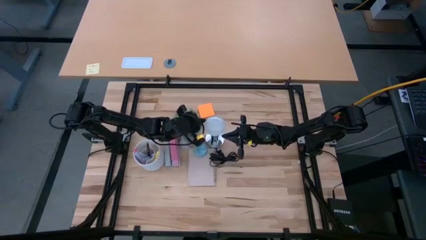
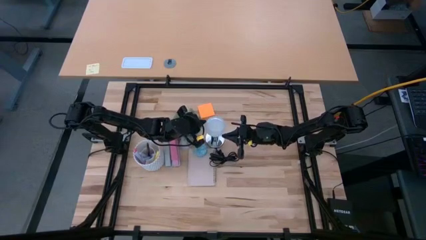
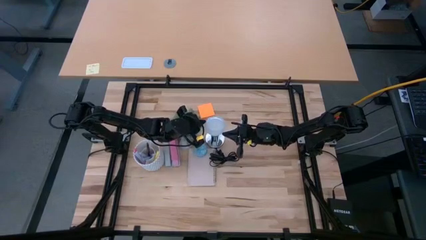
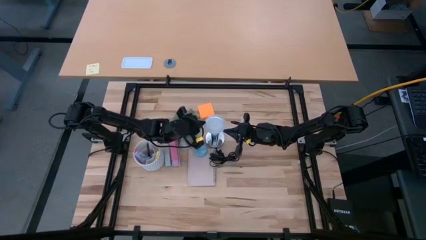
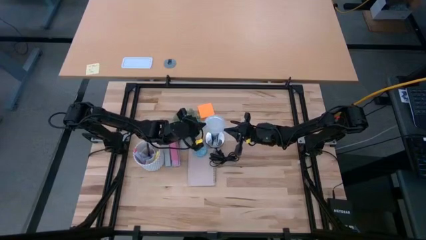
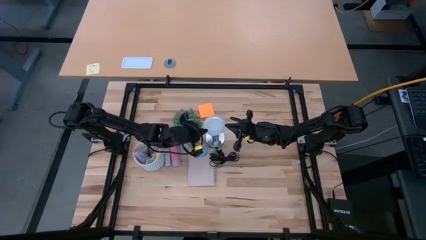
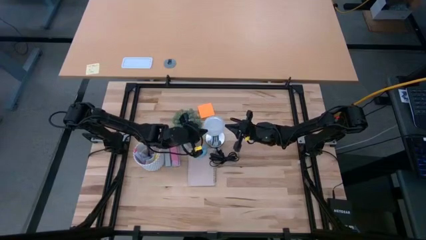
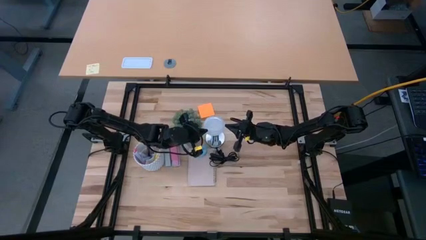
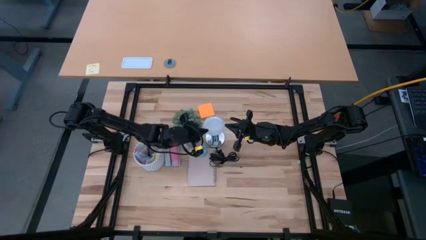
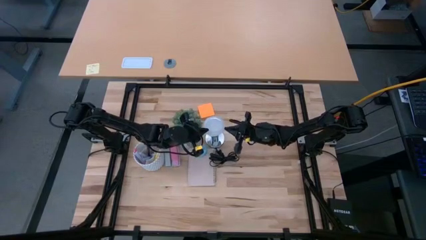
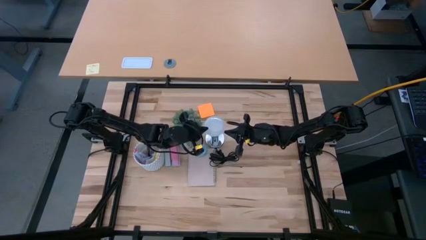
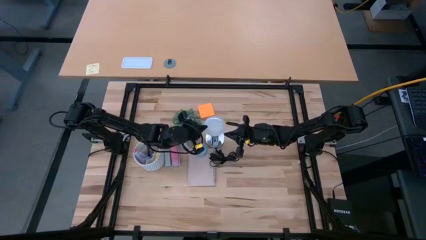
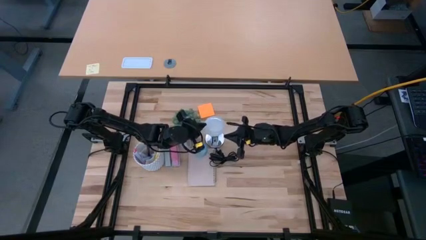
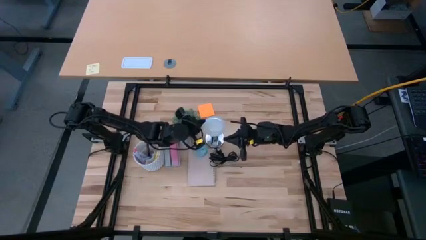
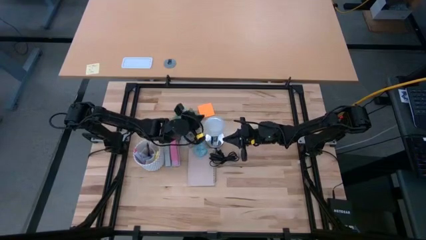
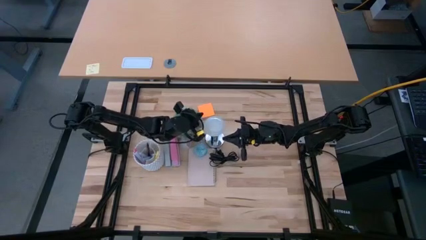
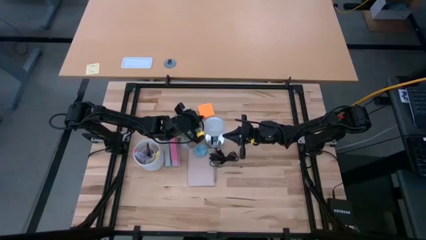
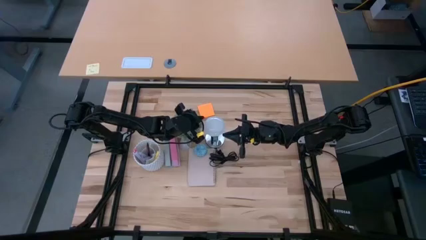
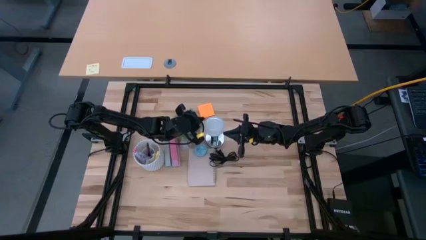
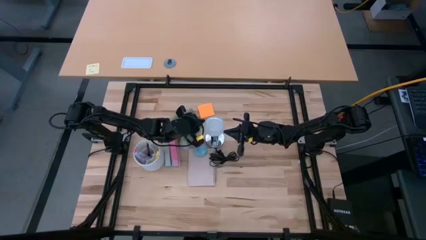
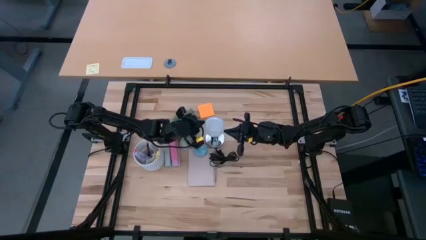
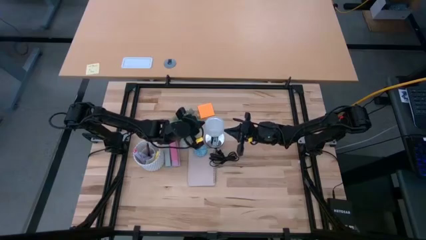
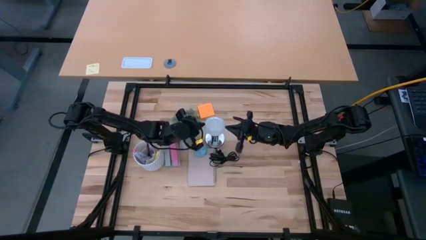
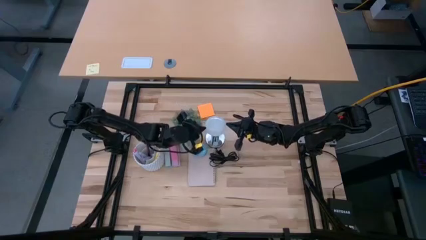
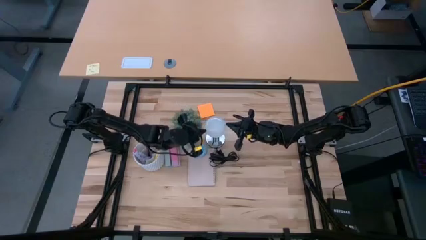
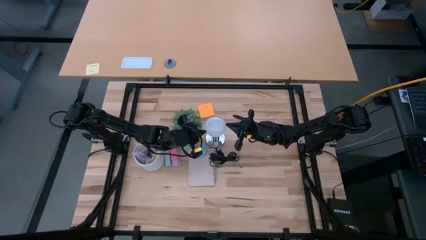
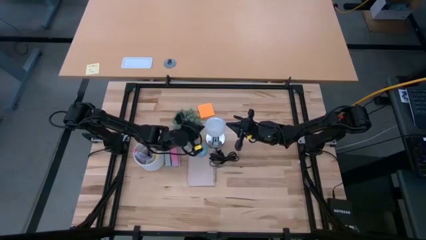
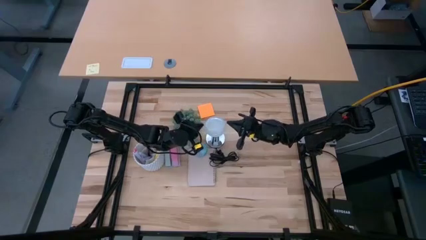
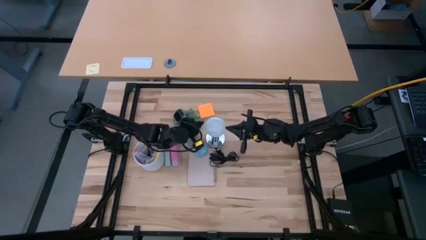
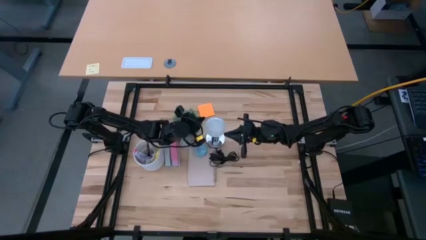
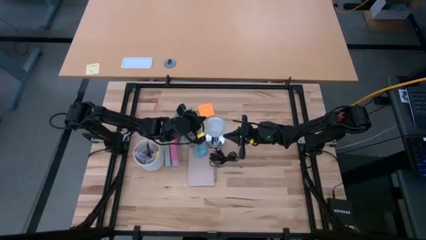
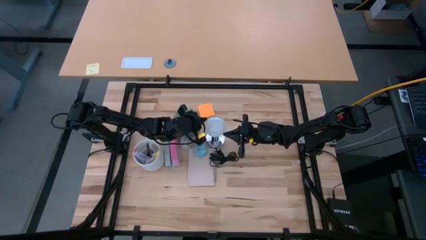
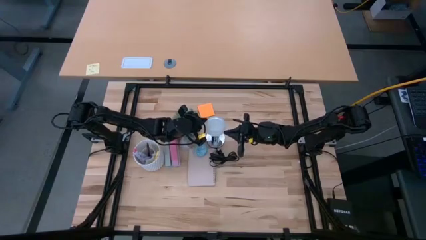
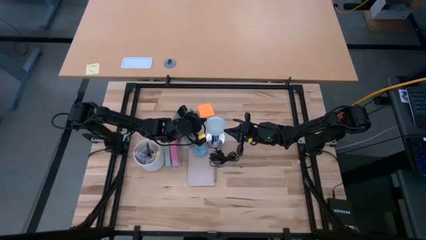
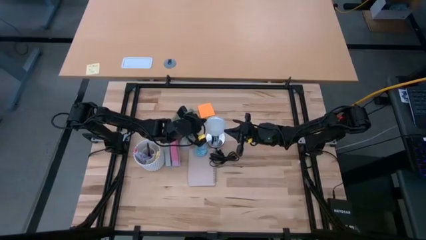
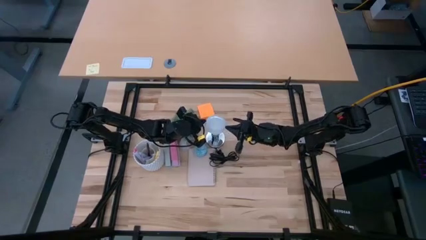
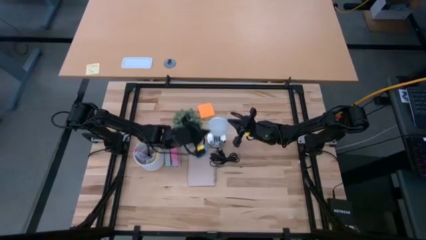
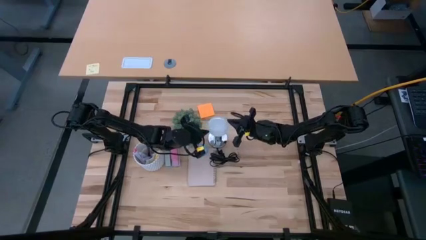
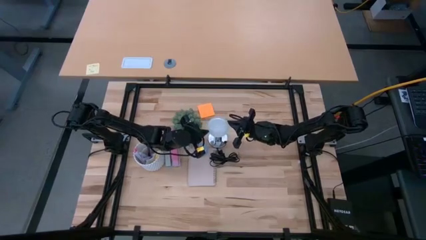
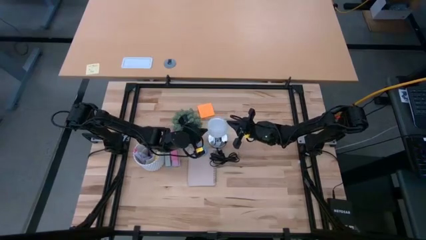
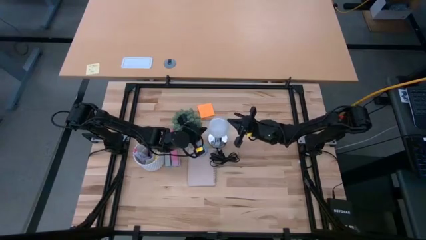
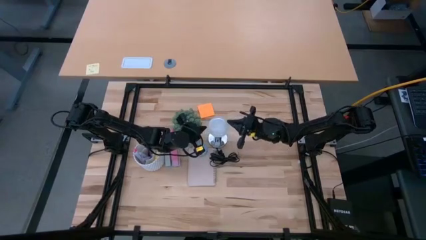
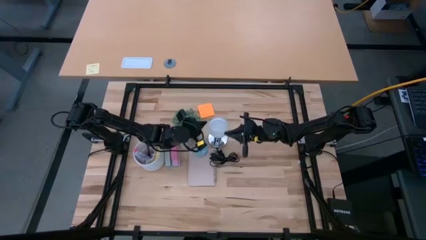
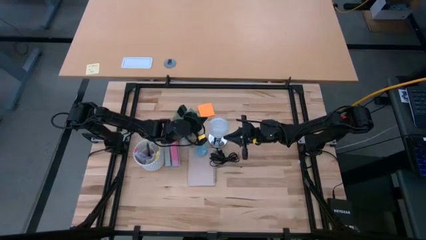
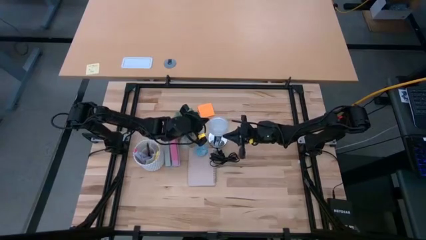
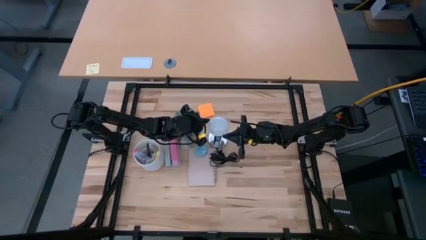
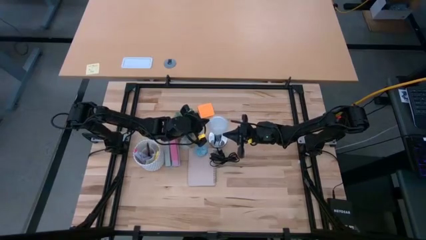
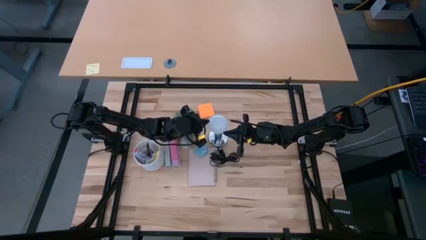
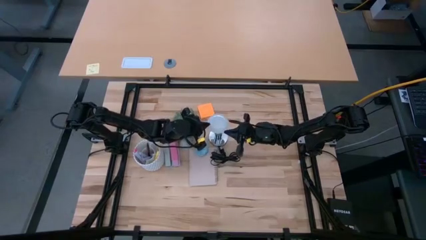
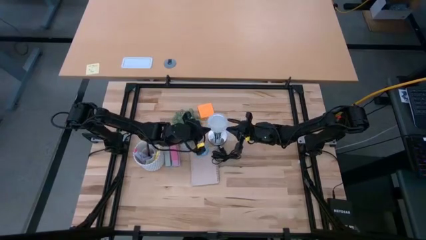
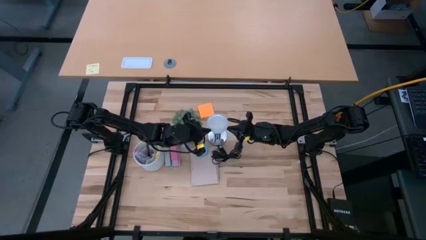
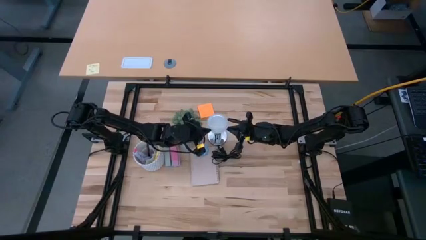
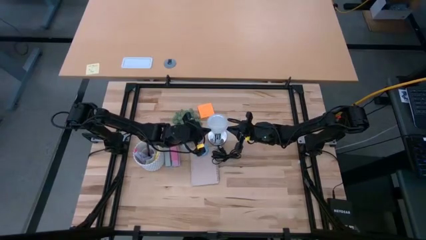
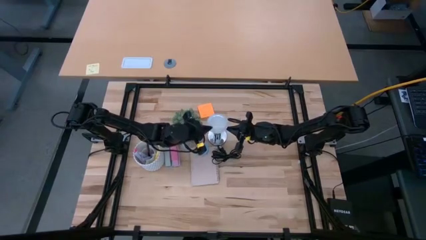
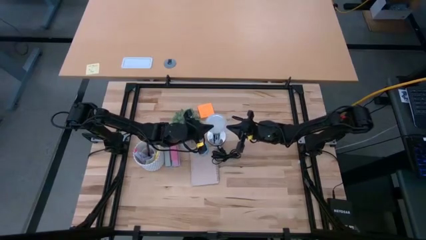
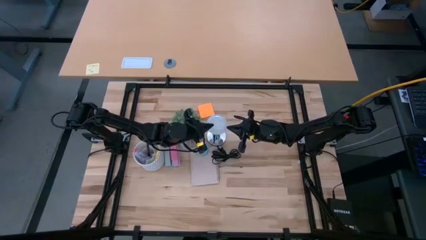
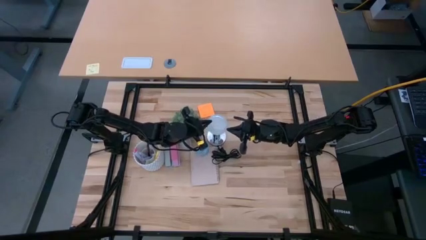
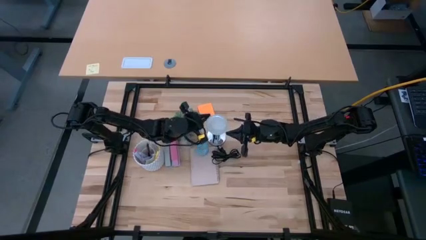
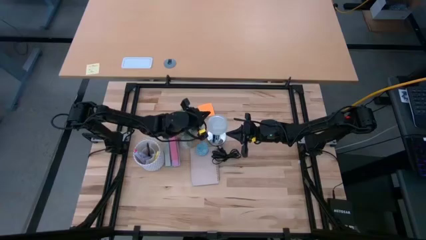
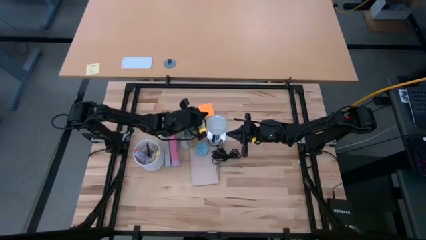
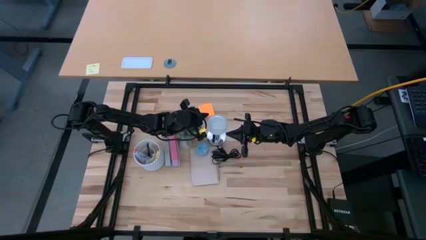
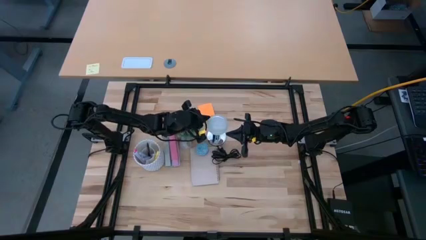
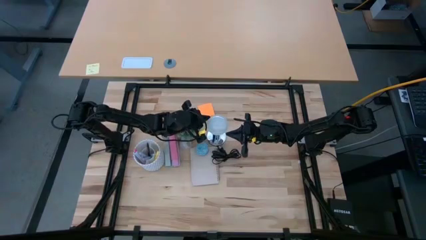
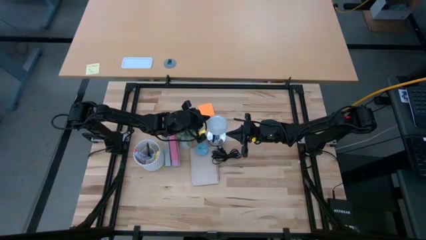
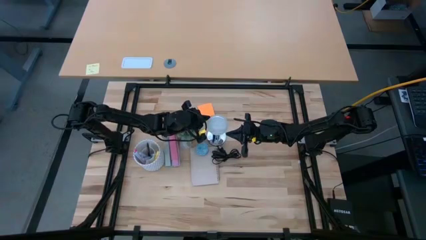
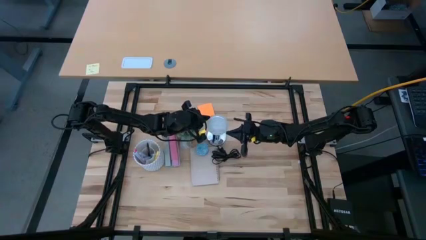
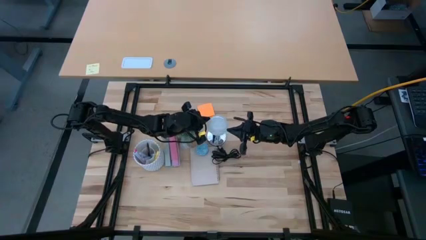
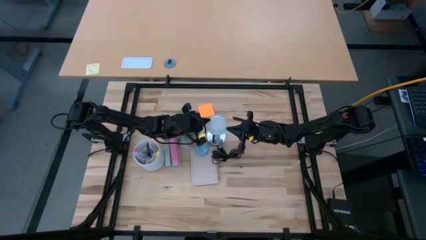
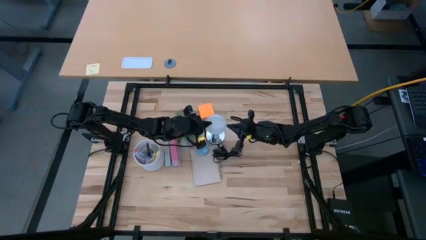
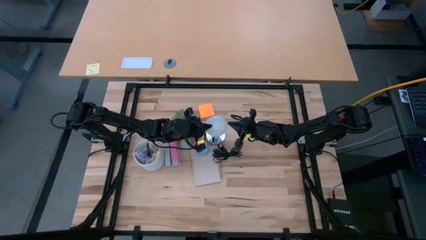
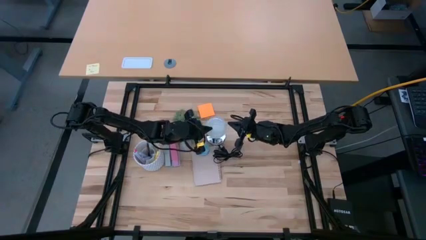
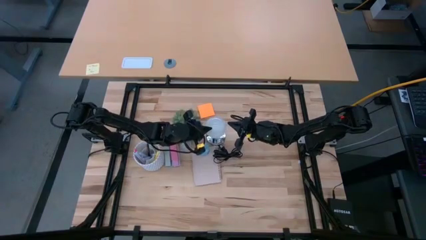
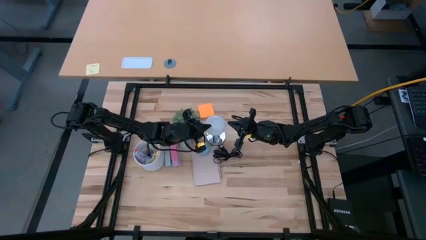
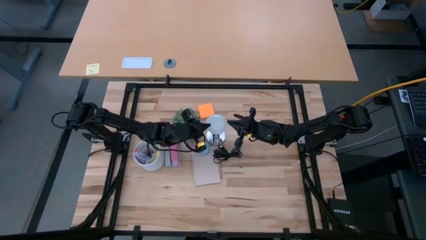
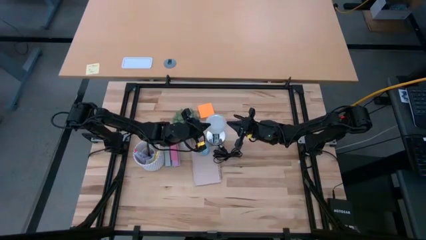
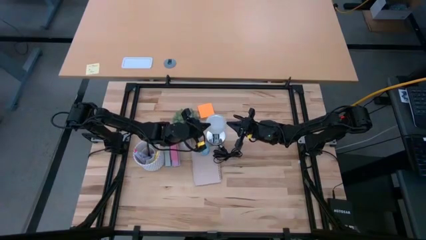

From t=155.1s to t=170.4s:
Task: Screw lightbulb
Remove the lightbulb from the silver lamp socket
